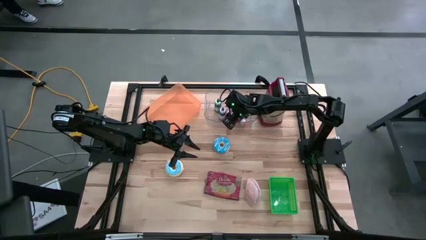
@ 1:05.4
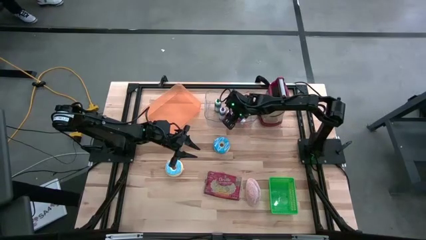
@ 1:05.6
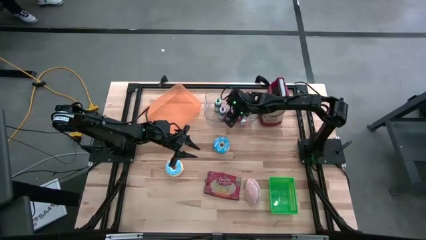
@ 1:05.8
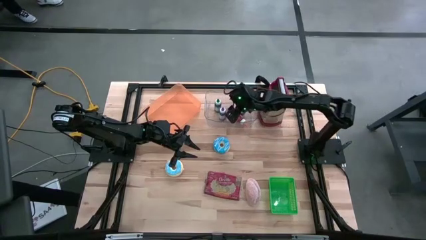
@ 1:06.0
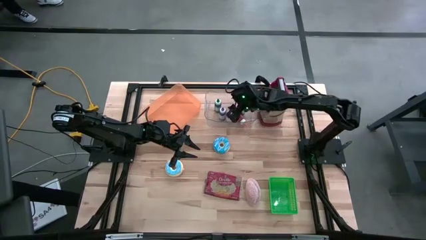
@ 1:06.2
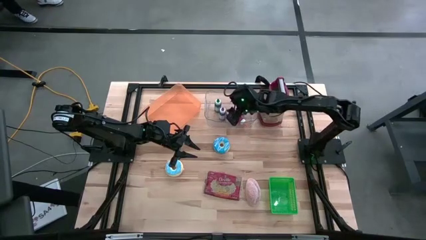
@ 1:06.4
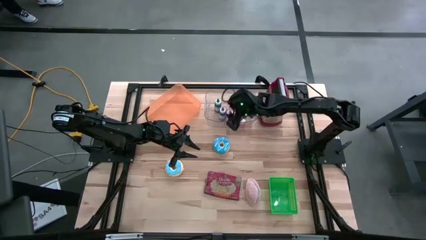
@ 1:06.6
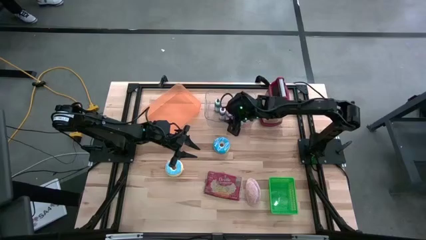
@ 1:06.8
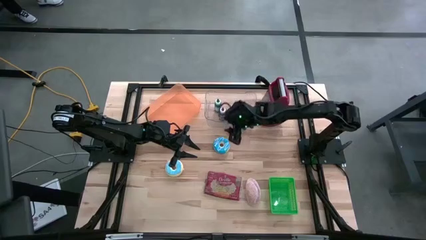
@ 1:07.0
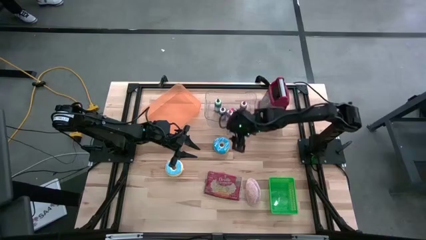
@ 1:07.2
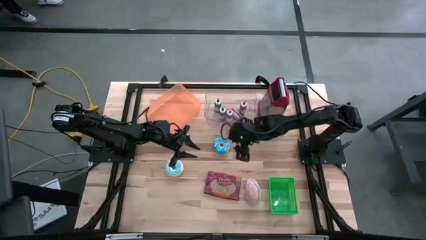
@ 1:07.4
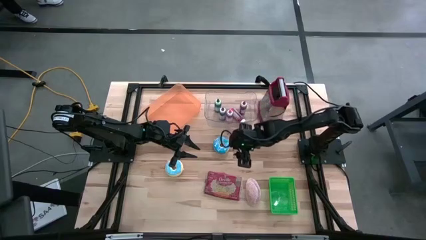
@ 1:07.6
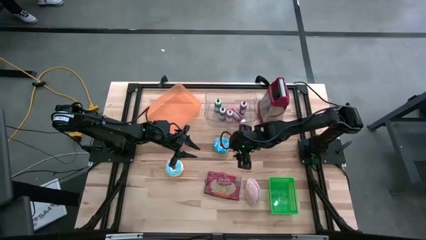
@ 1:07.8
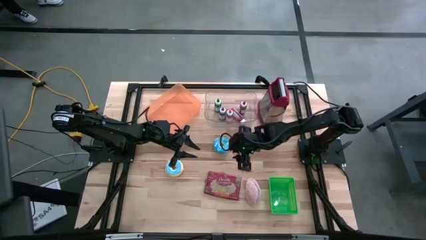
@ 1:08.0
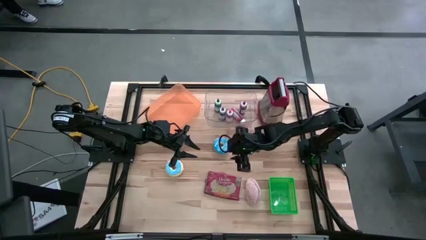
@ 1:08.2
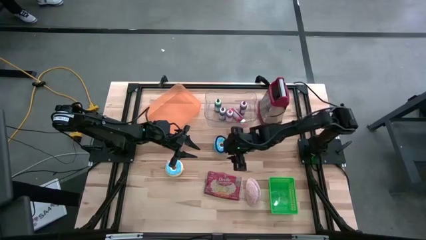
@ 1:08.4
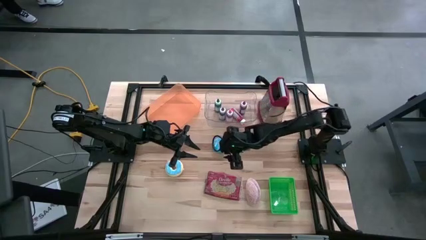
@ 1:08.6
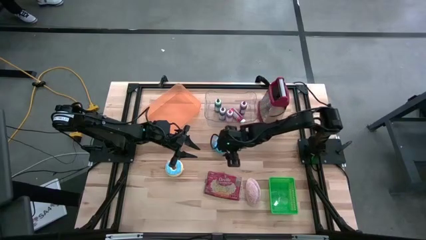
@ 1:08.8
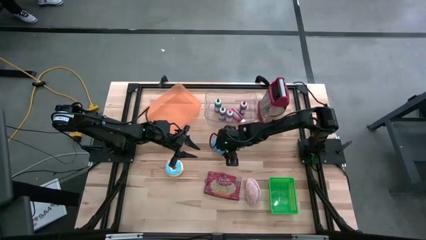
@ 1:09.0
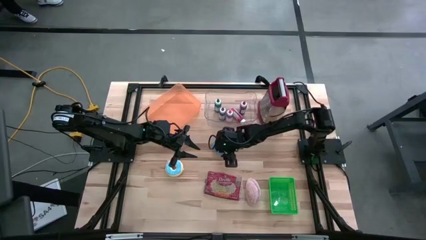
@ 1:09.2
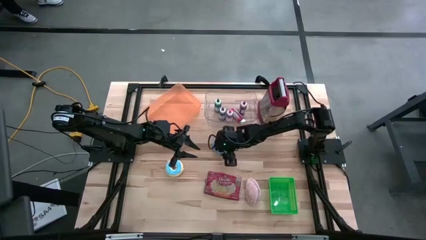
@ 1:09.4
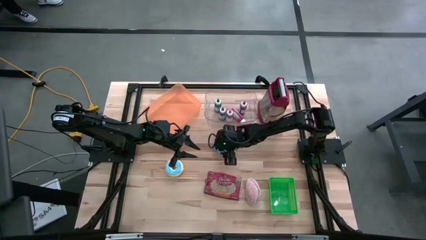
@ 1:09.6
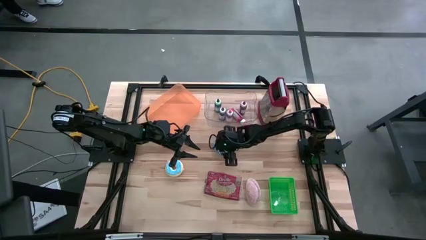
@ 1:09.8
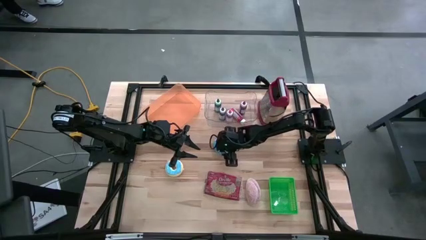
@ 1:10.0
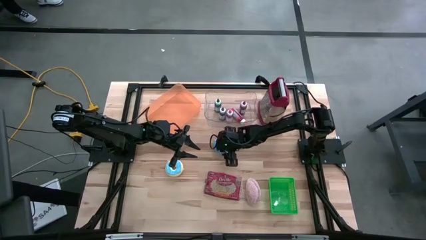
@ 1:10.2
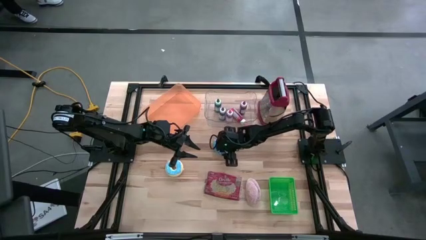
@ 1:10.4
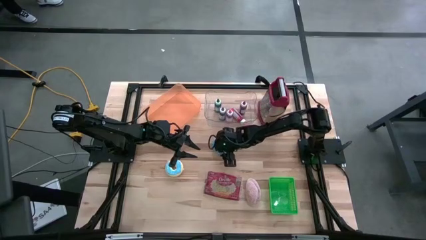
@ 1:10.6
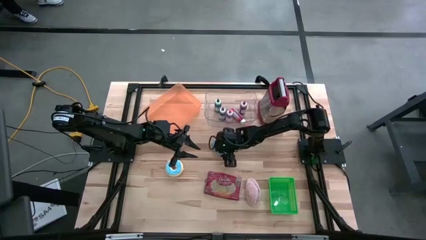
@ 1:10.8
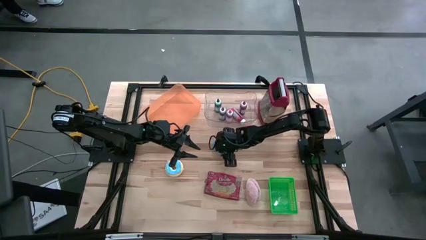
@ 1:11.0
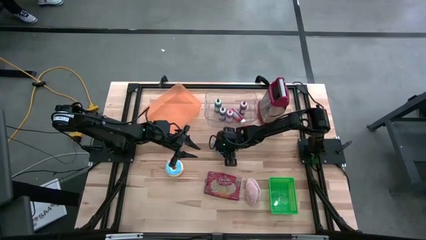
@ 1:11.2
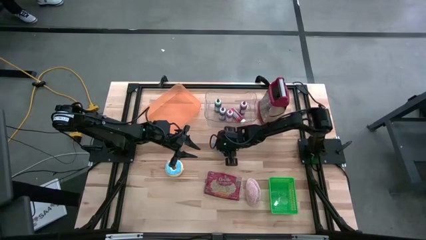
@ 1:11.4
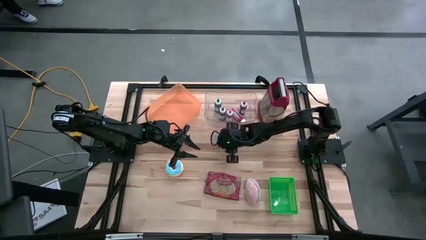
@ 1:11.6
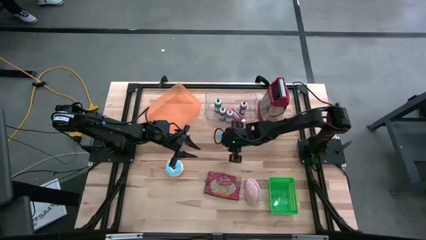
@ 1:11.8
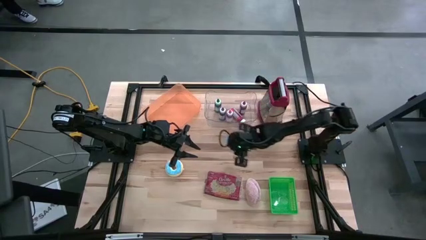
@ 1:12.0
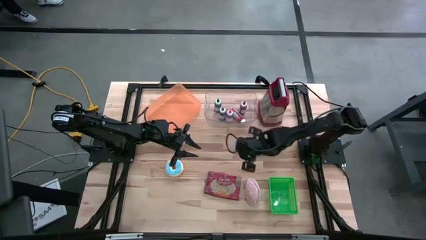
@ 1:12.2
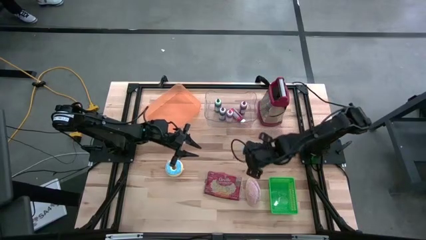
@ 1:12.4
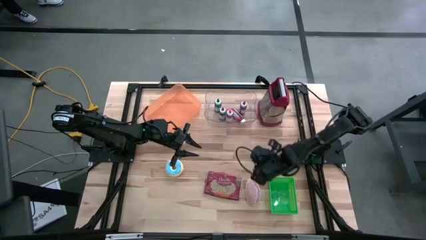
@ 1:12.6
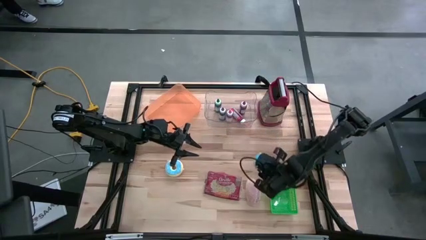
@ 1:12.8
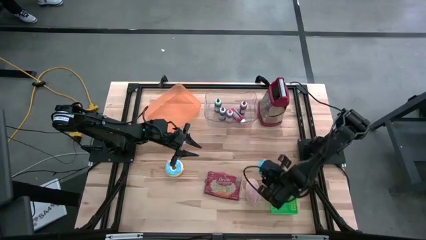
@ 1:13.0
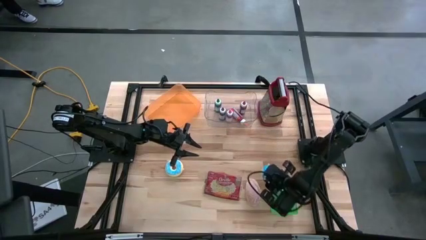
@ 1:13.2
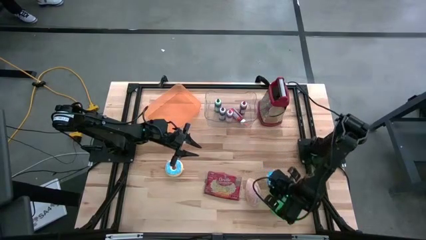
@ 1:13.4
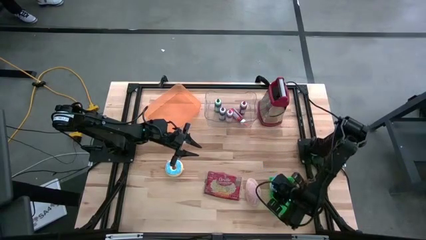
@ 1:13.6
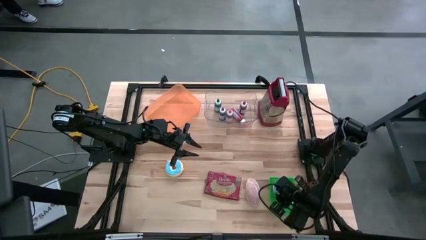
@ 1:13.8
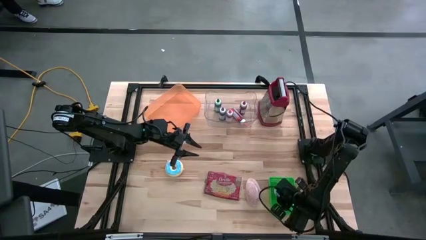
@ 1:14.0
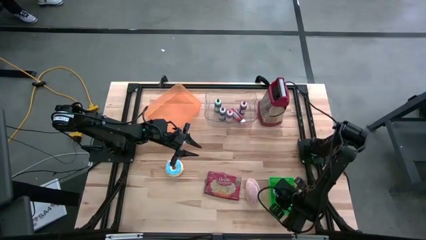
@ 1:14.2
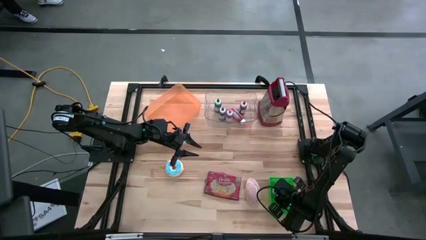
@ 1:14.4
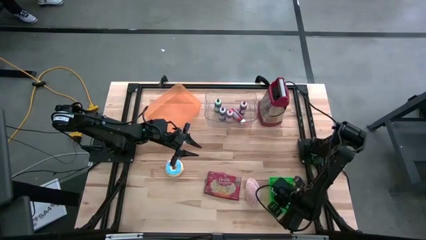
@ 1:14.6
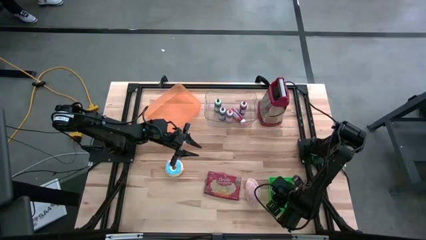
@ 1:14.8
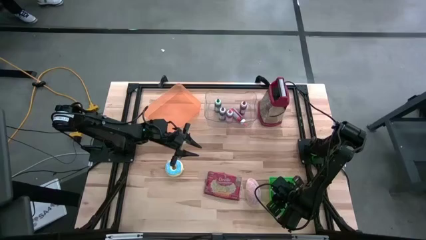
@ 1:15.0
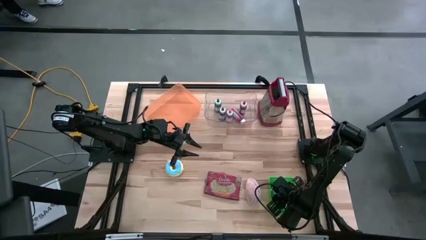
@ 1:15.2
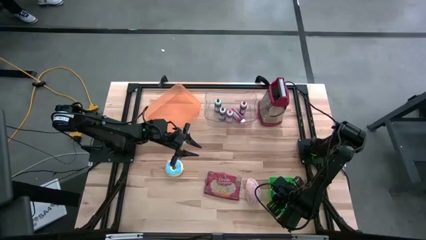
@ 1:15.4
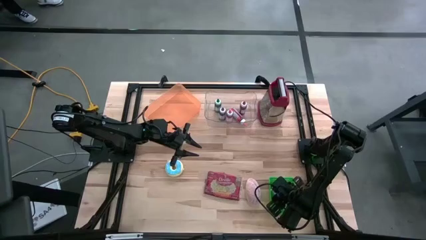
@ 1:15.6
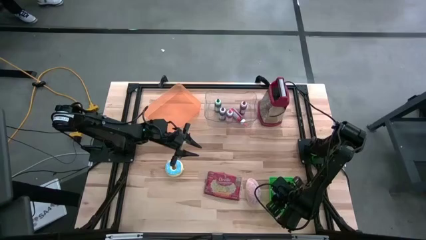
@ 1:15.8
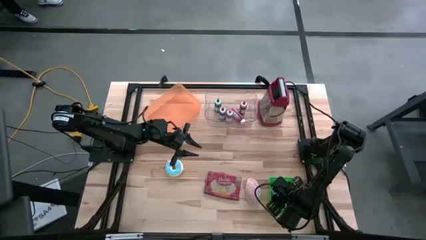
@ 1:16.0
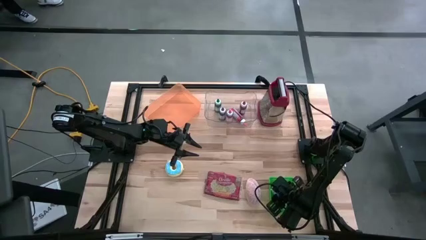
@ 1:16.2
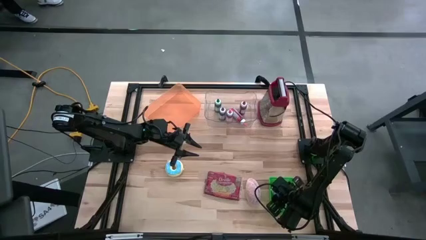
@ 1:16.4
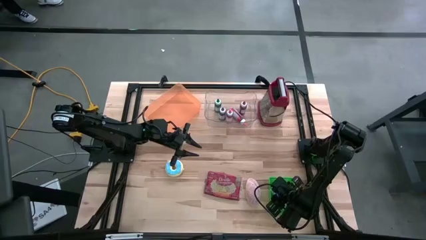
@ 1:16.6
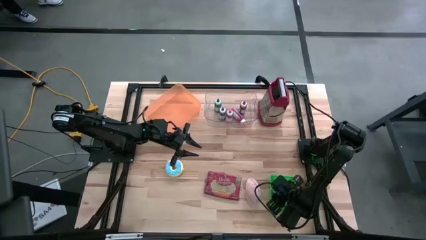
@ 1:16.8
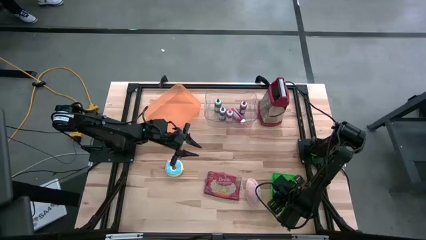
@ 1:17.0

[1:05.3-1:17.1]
Put the blue donut into the green bin
